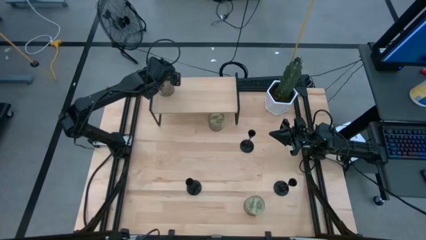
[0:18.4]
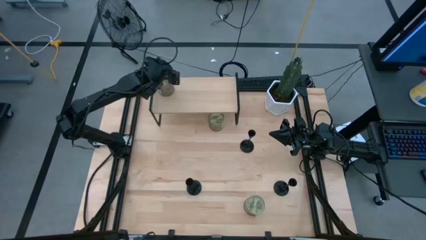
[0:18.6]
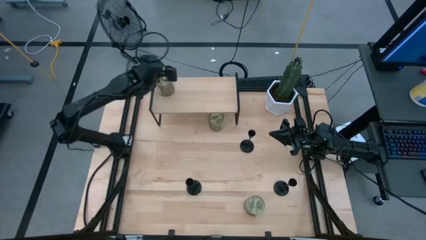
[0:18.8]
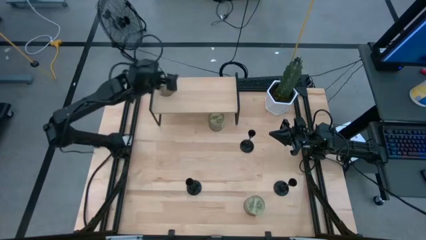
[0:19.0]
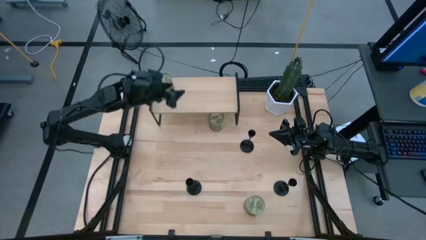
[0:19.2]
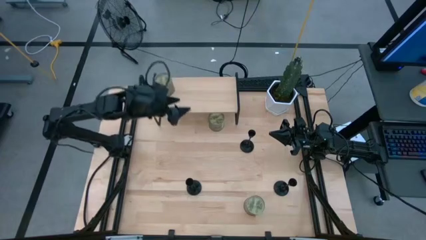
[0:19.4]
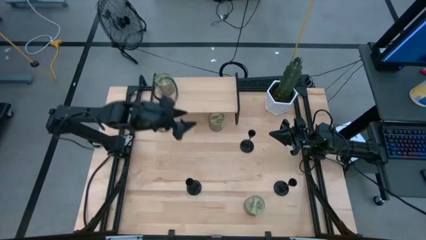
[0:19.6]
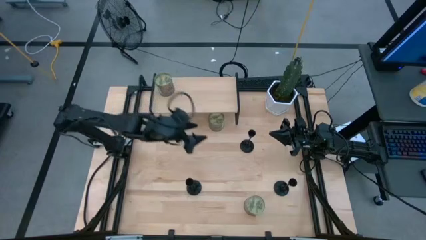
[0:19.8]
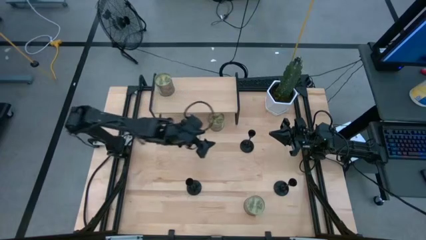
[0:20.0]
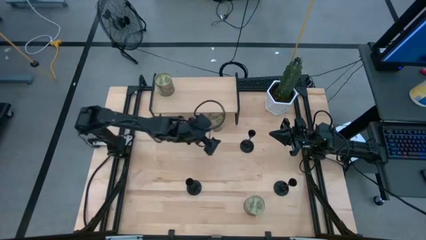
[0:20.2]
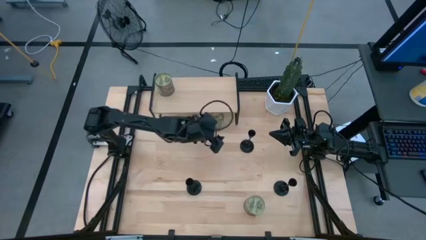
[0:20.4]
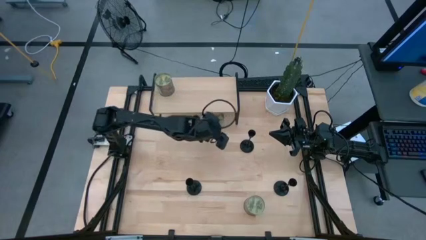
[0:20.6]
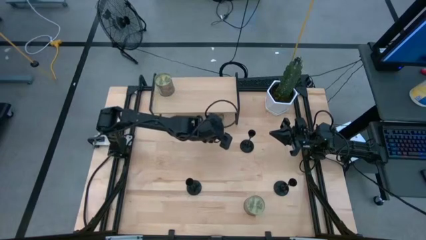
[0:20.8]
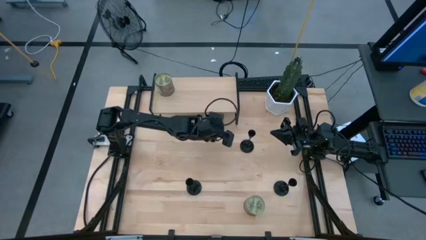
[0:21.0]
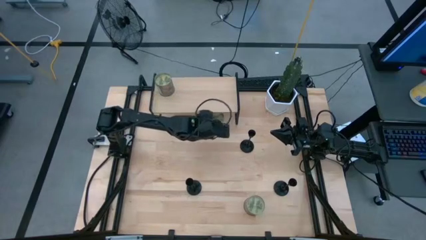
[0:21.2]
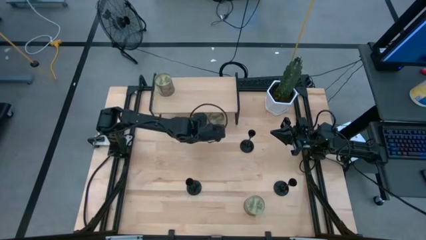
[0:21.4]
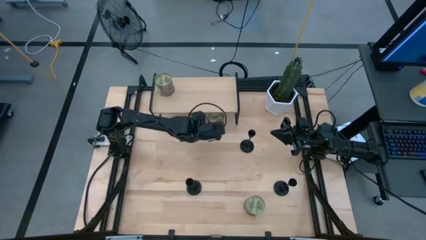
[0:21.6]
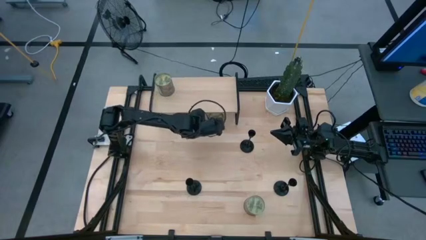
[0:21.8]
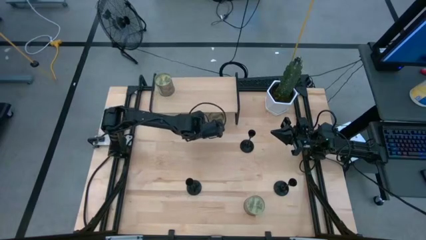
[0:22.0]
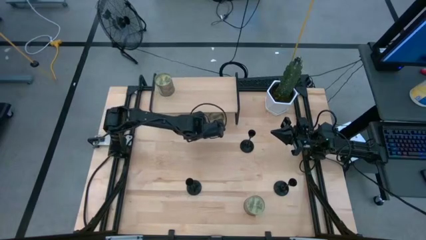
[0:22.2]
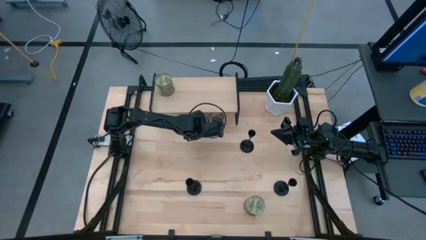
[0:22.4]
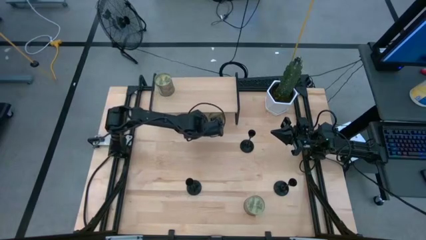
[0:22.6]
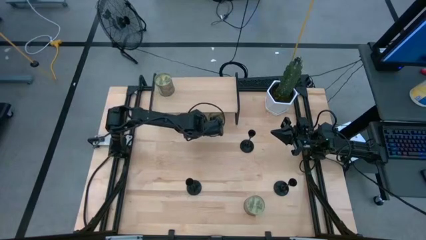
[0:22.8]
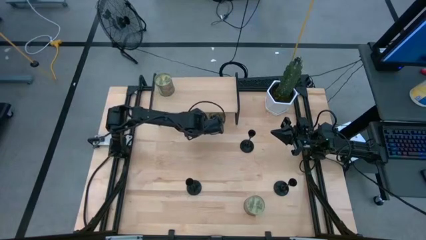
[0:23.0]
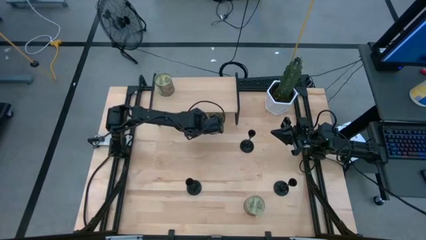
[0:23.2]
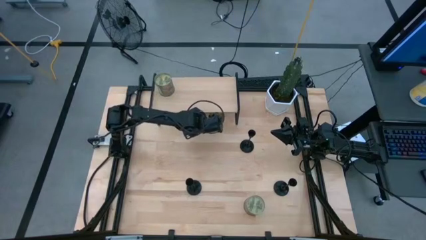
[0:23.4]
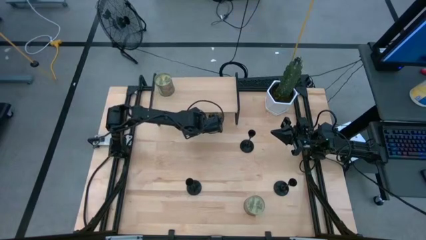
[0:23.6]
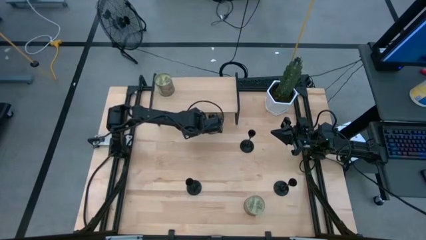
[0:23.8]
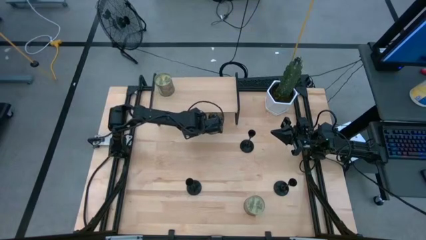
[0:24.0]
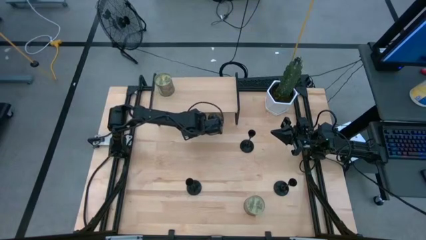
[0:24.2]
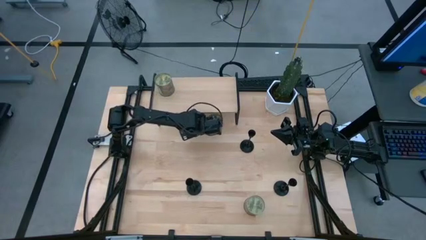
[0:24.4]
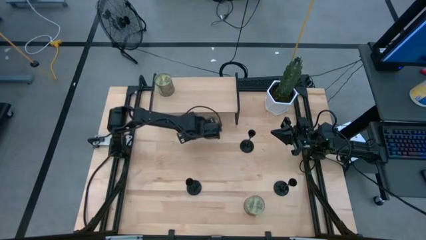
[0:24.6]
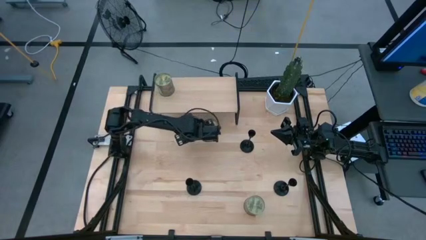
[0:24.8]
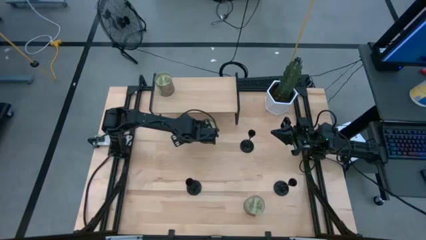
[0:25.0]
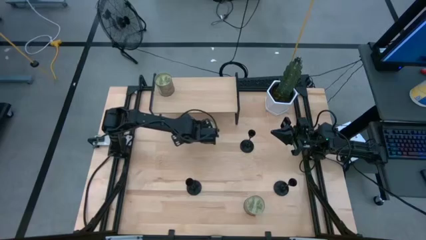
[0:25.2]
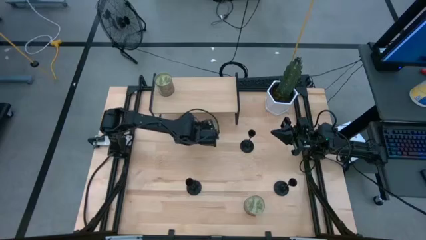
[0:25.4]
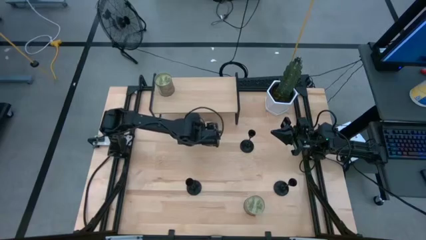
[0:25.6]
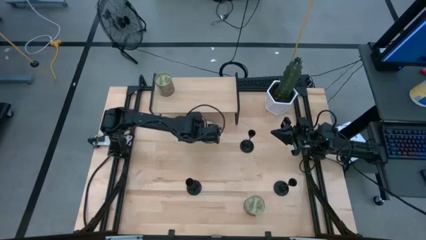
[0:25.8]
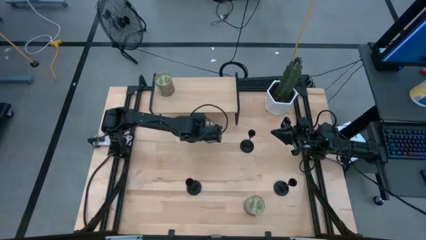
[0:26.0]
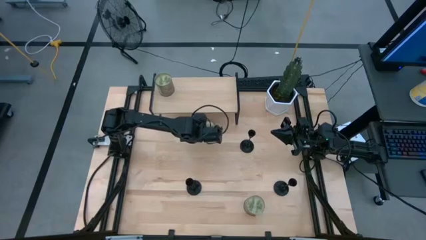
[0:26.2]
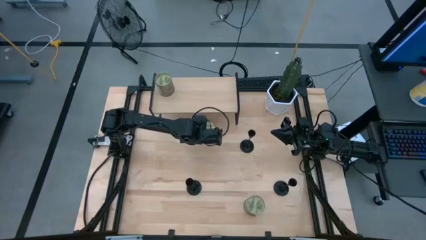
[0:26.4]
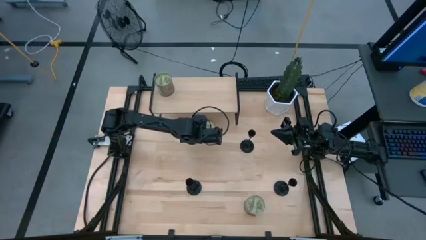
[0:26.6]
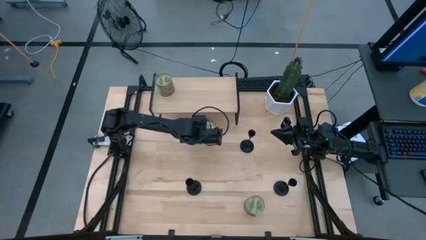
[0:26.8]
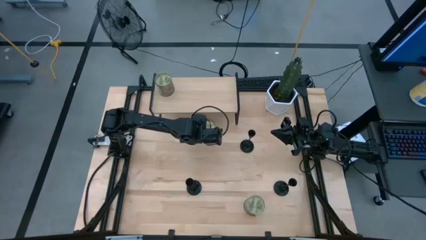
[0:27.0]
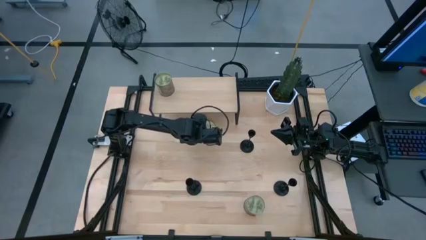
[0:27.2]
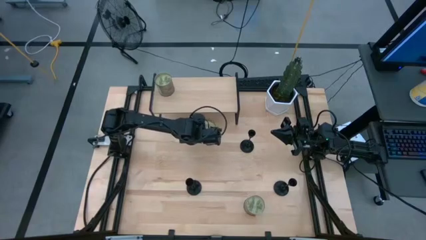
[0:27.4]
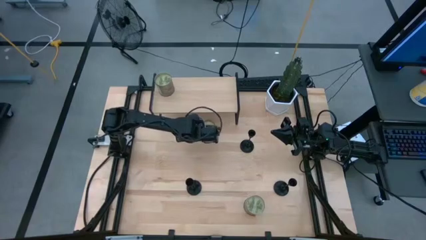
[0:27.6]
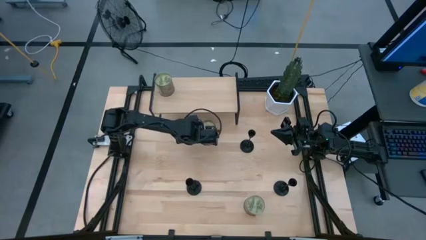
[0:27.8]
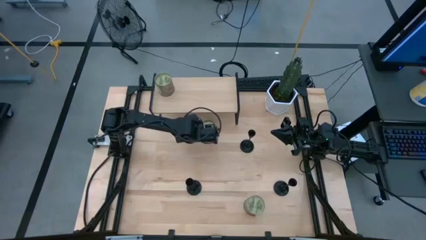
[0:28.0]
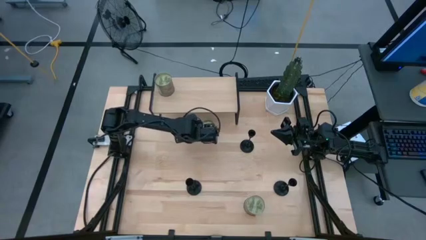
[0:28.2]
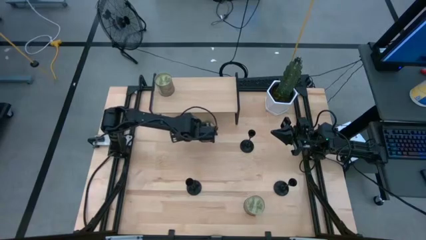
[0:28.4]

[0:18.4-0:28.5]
Task: Pick & Place candle stick holders
Put the top green scented candle on the shelf

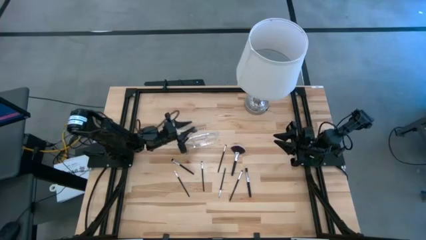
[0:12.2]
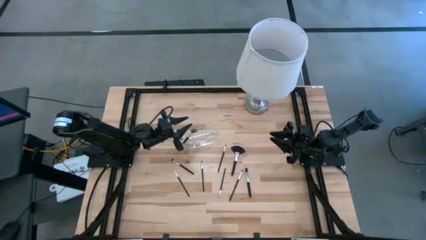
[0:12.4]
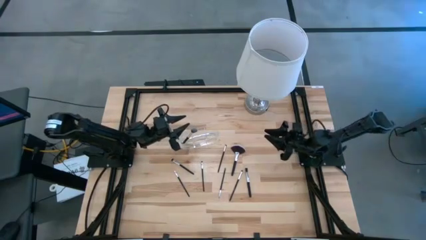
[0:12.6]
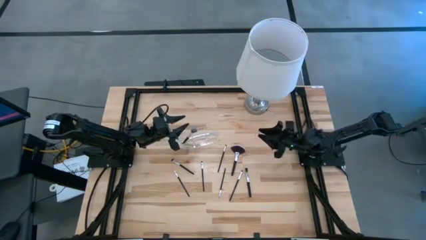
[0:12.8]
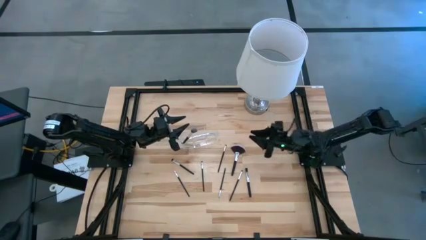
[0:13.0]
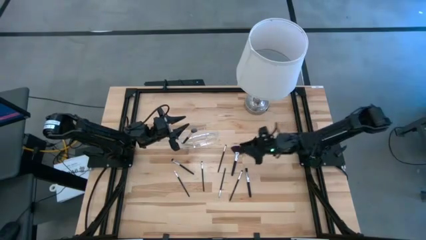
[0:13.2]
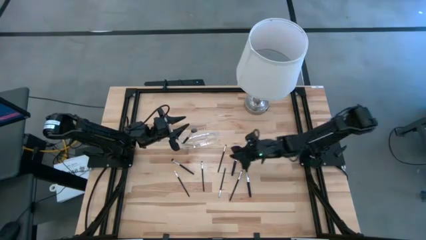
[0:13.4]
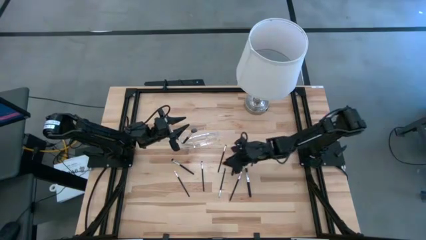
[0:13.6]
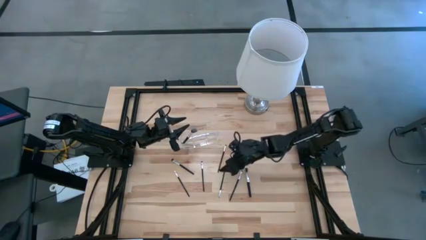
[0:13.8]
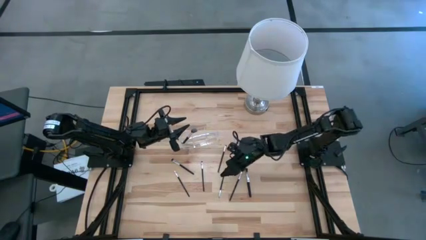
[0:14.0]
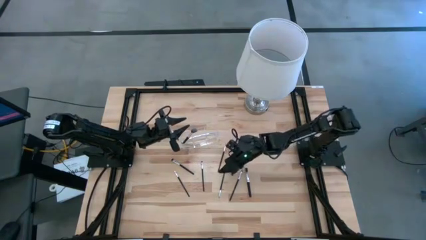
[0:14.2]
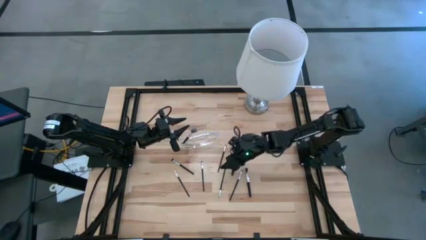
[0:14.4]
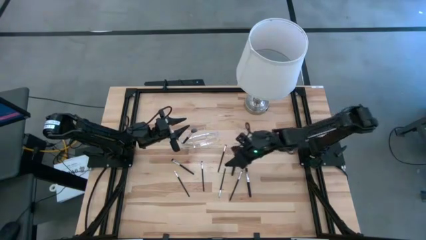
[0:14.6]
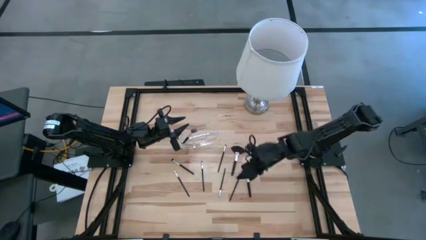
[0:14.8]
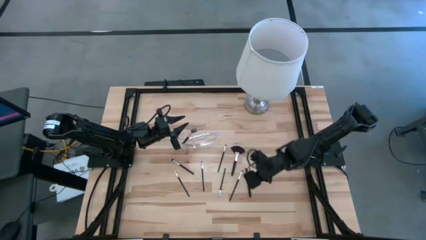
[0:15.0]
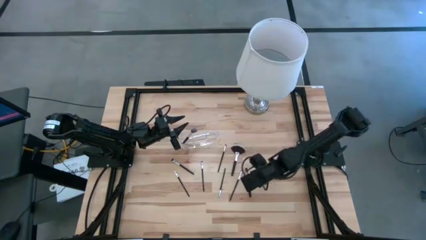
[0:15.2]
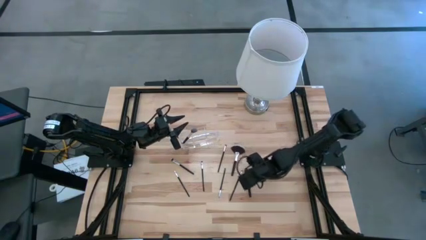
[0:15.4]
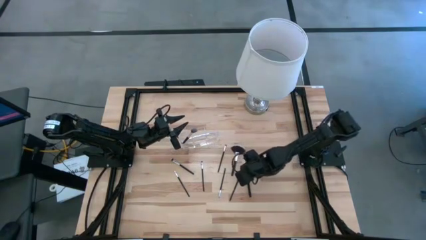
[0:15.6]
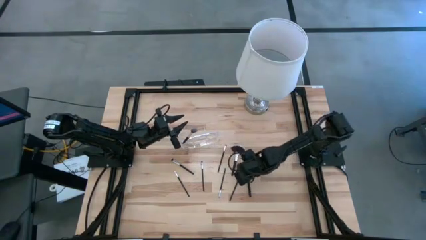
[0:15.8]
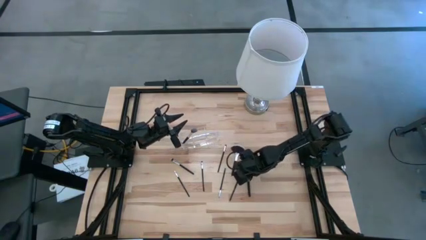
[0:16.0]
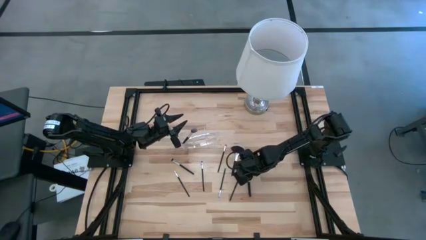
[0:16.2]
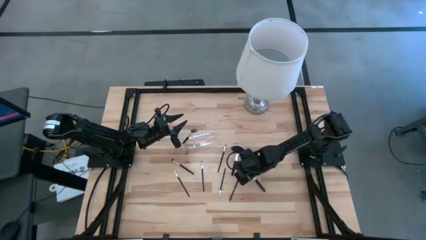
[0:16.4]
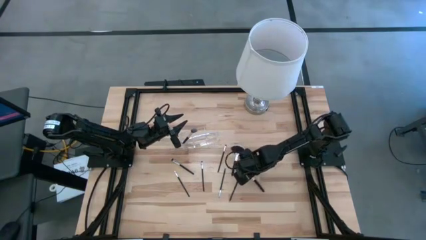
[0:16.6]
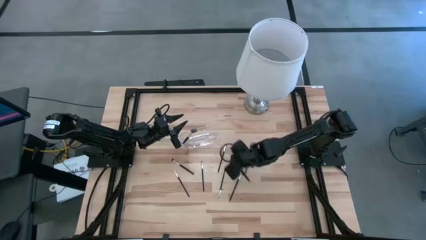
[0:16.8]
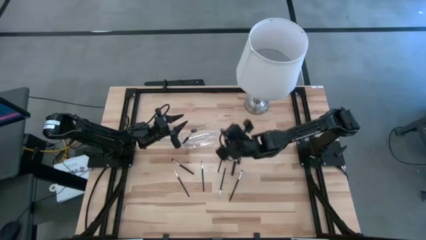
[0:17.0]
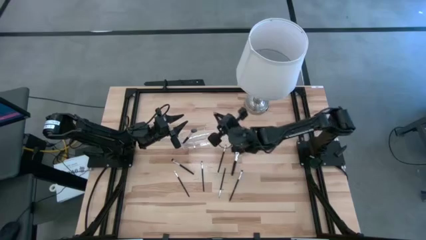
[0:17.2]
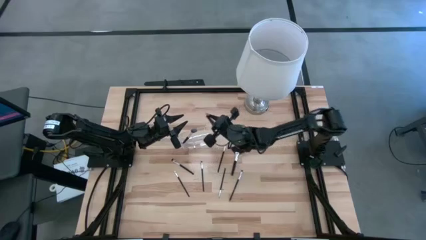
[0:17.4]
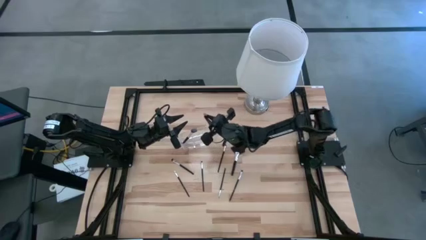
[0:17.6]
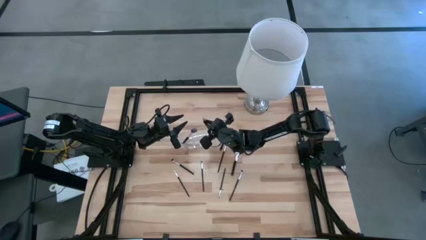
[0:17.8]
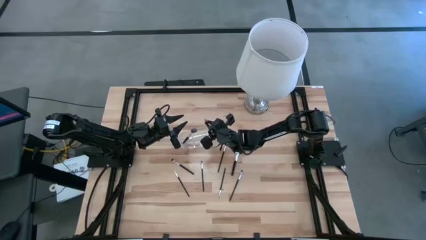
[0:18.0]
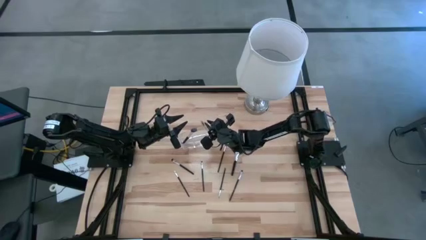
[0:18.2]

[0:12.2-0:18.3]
Task: Put items in baskets/containers
Put the blush brush into the right transparent organizer
